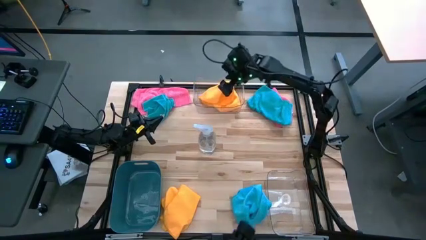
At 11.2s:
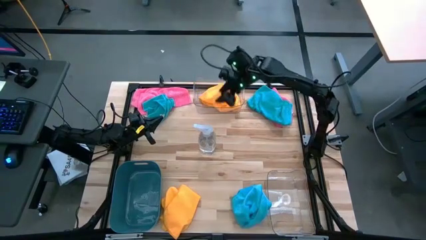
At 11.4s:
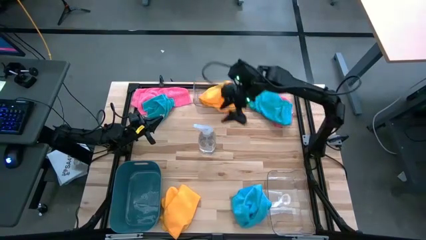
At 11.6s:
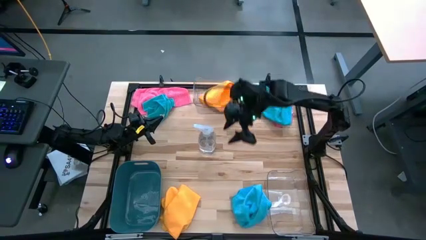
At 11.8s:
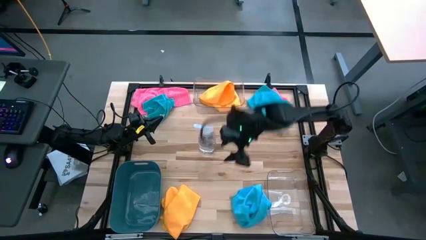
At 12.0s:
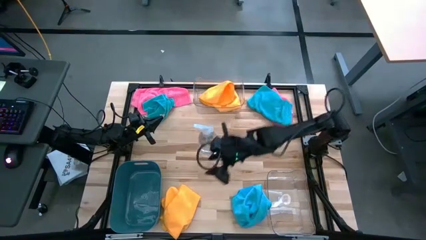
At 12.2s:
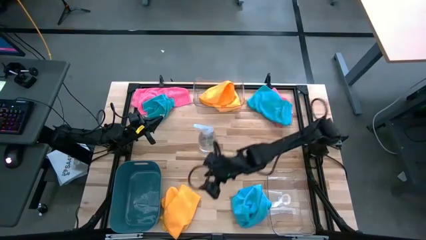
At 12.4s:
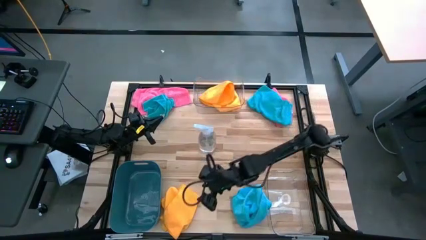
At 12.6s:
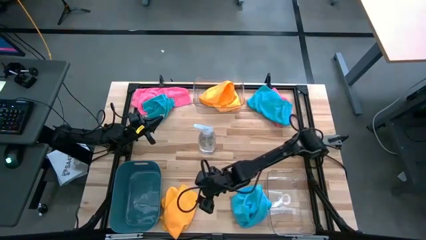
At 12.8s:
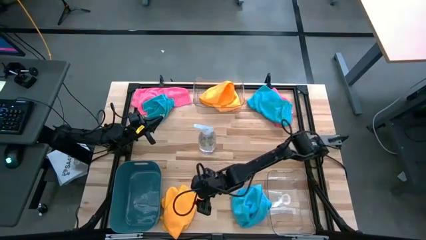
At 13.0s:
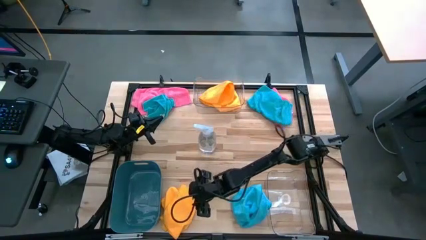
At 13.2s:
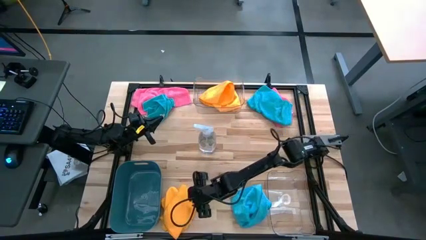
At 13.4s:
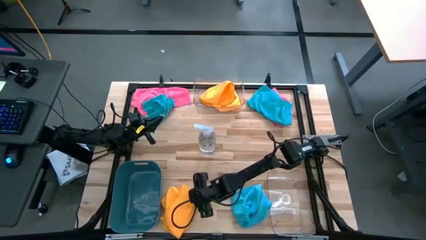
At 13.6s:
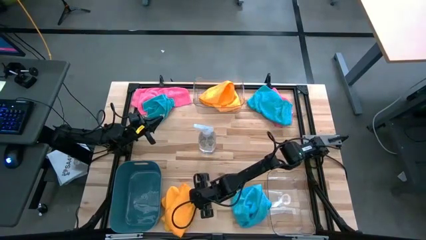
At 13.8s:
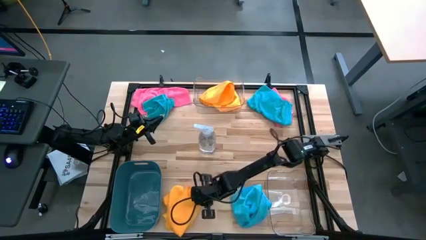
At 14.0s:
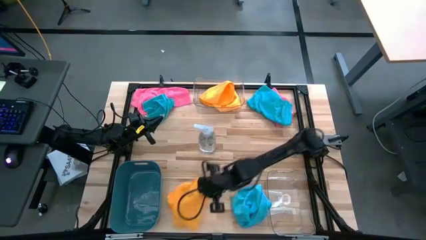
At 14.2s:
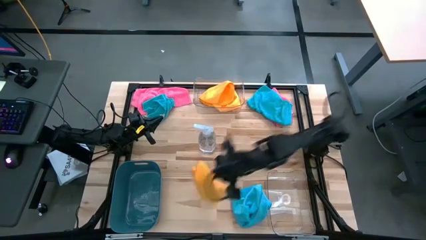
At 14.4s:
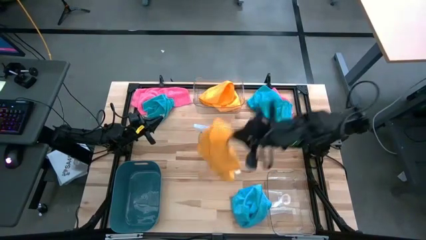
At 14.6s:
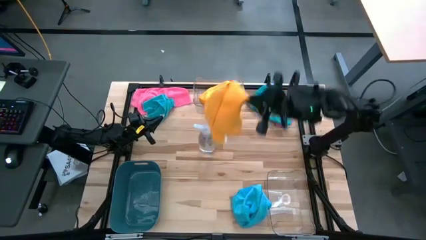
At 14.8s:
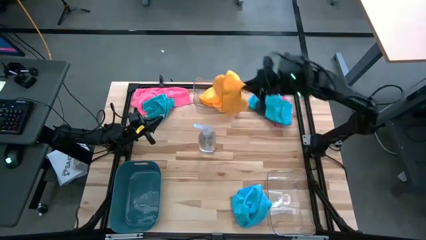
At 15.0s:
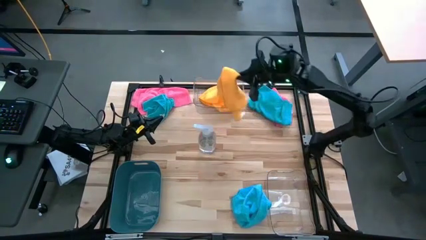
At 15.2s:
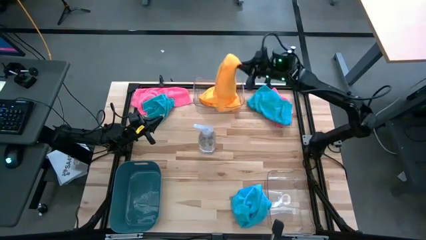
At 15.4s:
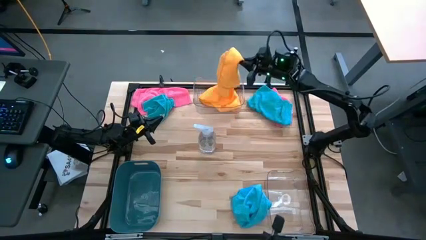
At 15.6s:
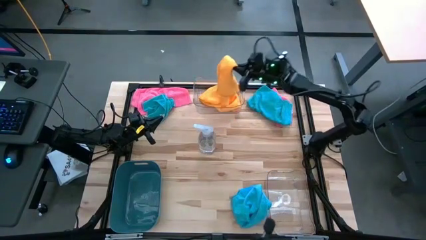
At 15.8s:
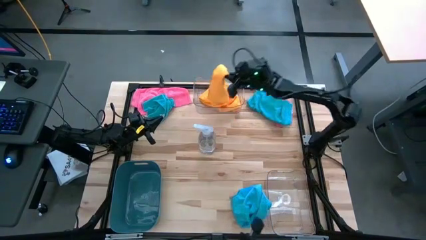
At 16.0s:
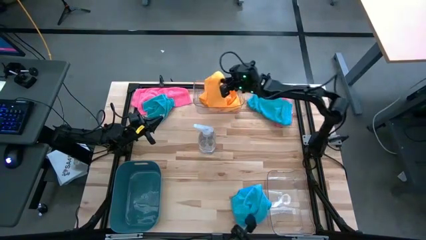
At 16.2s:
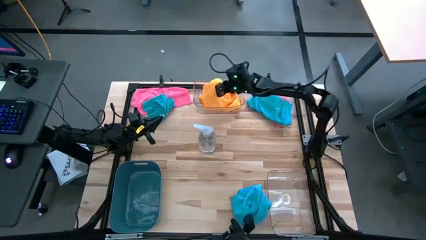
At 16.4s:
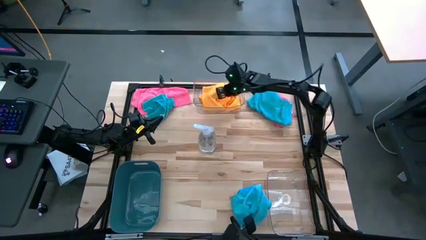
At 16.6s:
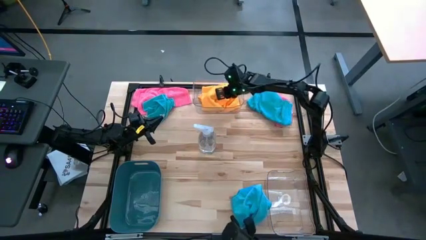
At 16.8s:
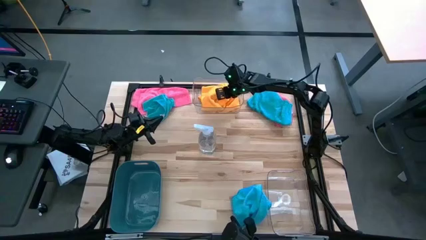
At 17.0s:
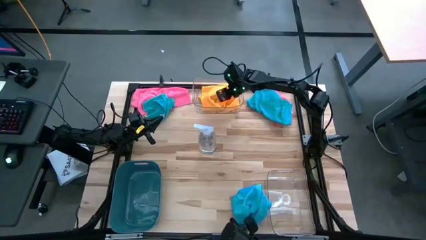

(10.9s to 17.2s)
Task: Sort microfiber towel by color & place in baskets
Put the yellow microfiber cloth into the top transparent bin

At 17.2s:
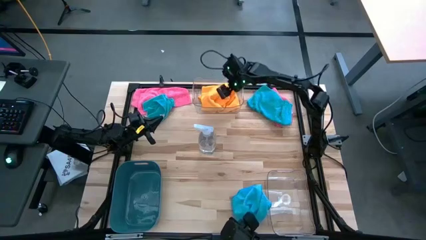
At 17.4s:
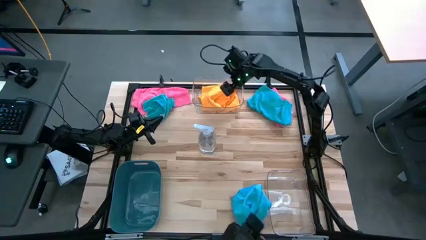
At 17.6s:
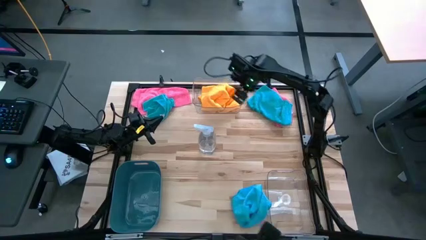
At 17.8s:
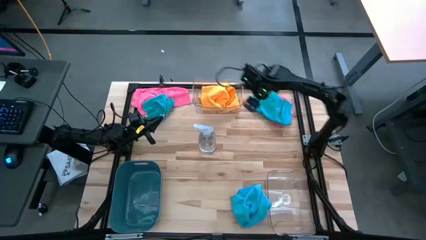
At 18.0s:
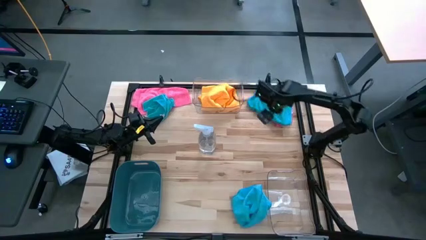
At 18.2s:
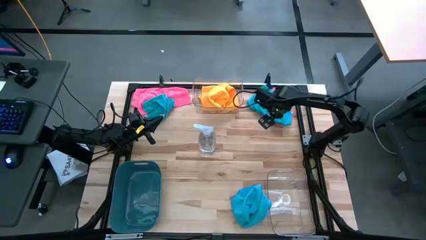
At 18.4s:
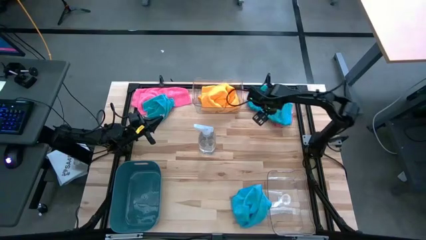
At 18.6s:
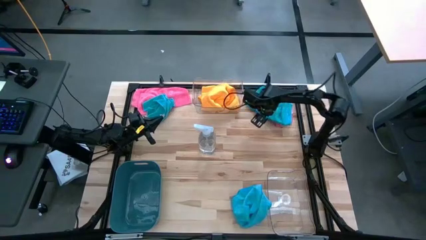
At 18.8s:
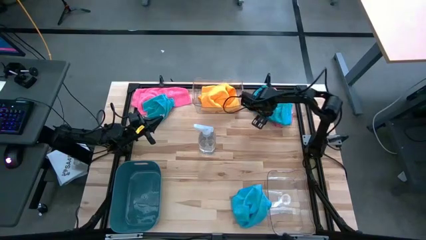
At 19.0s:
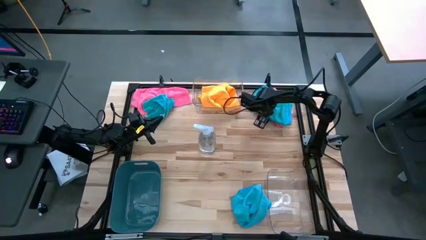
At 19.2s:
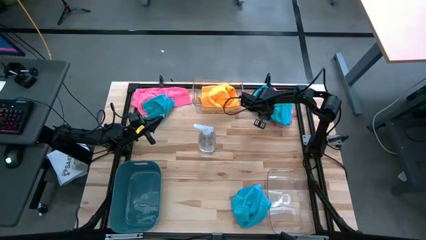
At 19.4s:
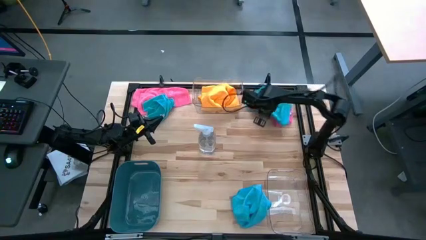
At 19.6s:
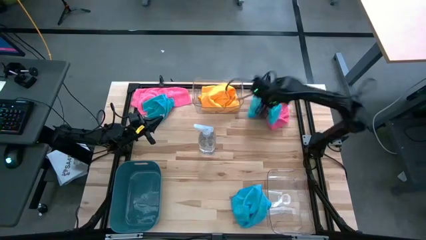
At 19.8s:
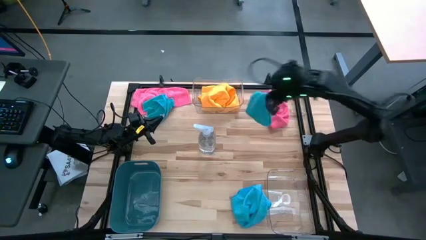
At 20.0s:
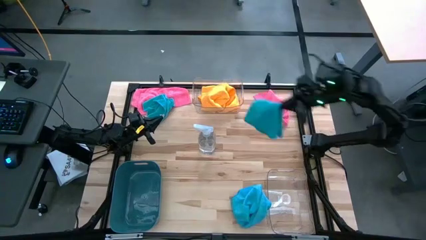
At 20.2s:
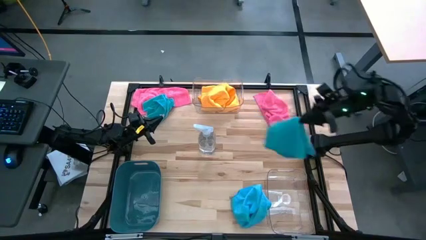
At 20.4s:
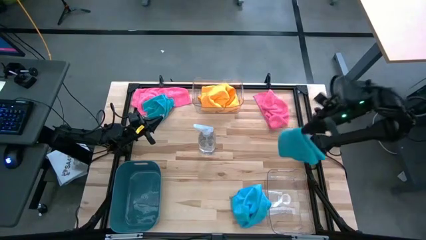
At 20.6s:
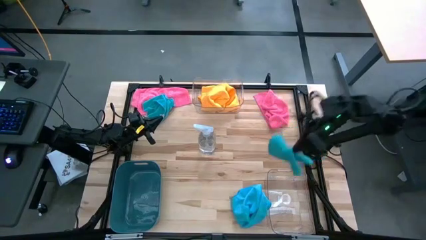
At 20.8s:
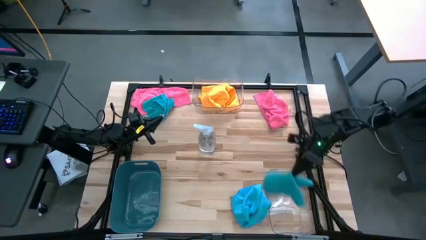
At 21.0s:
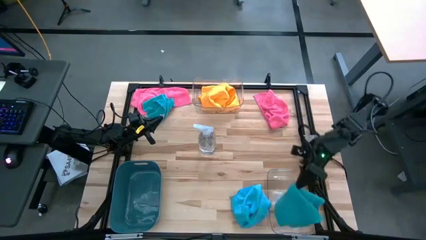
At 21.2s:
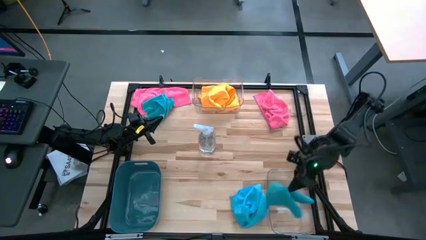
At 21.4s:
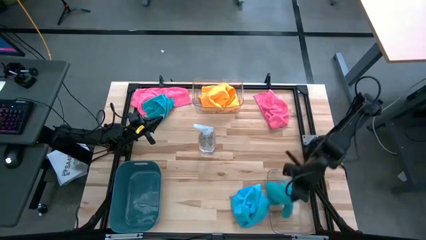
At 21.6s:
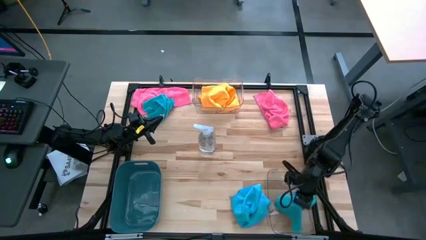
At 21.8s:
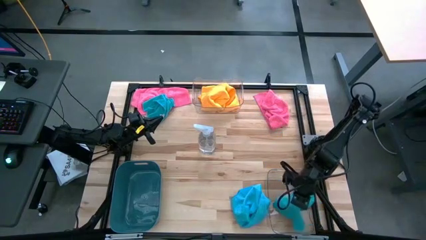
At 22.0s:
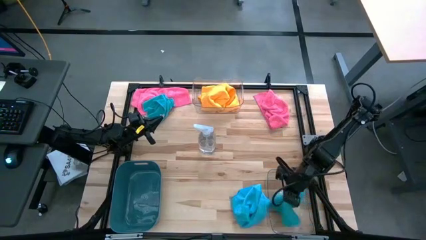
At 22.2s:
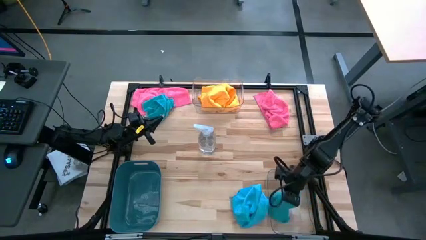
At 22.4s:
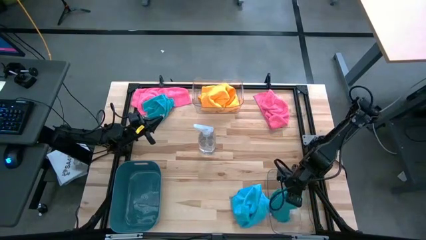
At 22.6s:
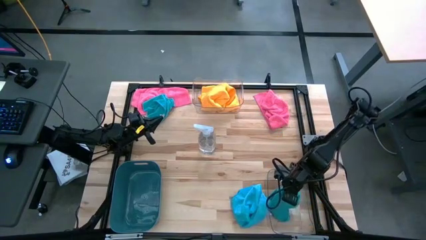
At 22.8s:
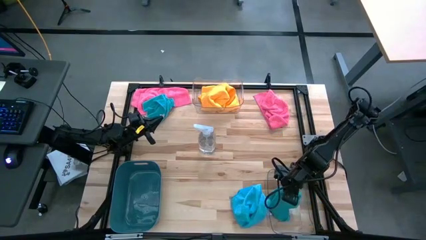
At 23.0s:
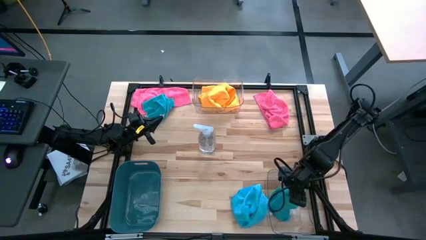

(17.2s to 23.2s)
Put the top right blue microfiber cloth into the bottom transparent bin

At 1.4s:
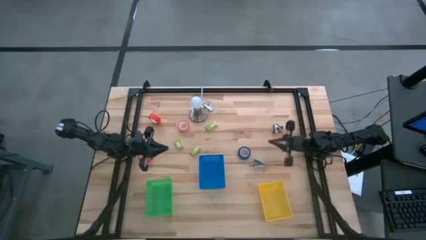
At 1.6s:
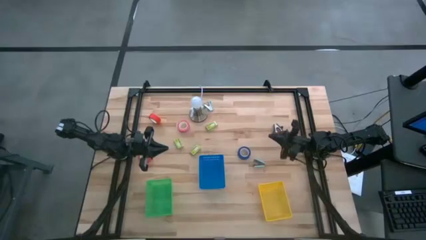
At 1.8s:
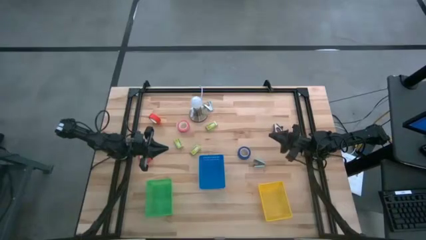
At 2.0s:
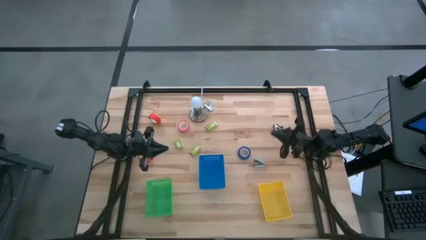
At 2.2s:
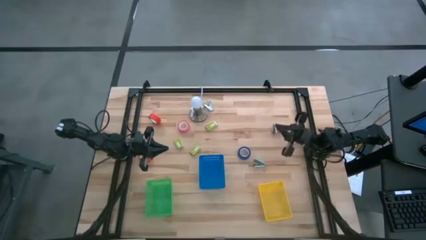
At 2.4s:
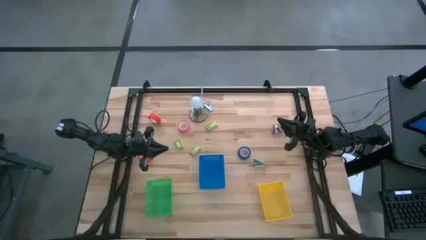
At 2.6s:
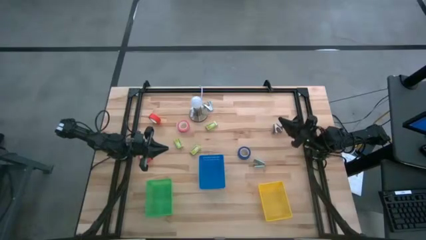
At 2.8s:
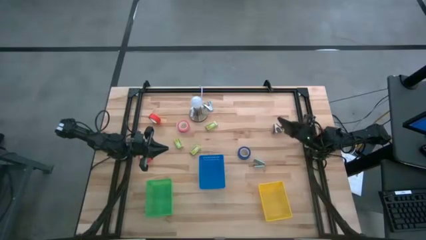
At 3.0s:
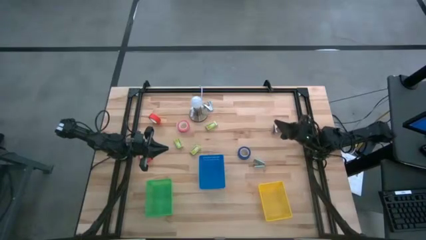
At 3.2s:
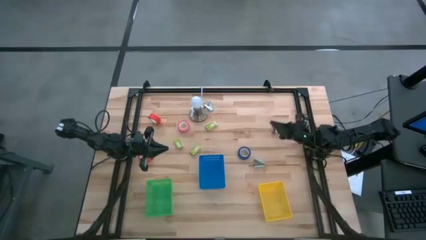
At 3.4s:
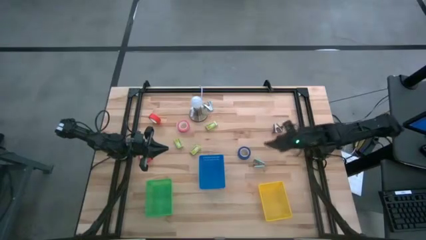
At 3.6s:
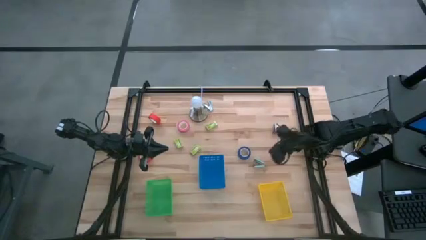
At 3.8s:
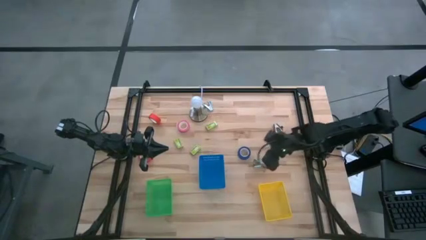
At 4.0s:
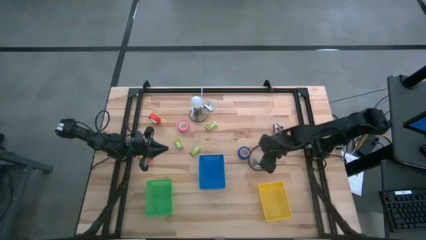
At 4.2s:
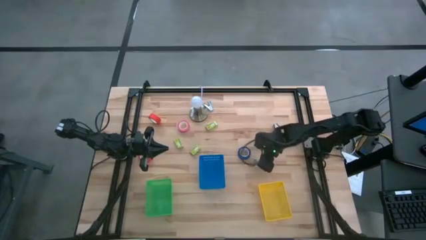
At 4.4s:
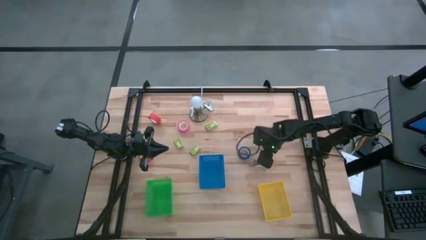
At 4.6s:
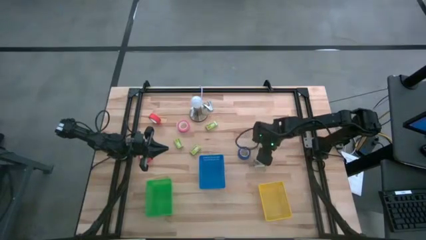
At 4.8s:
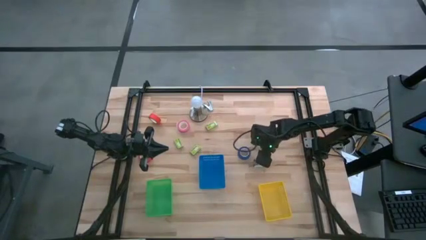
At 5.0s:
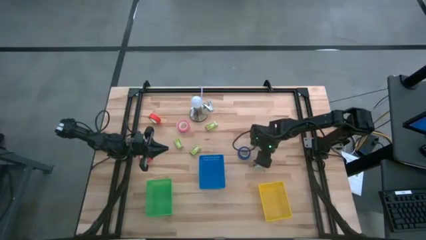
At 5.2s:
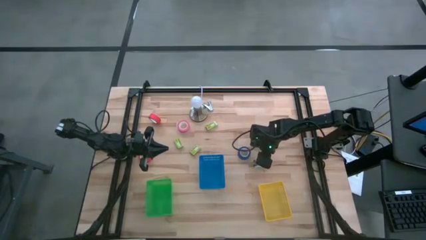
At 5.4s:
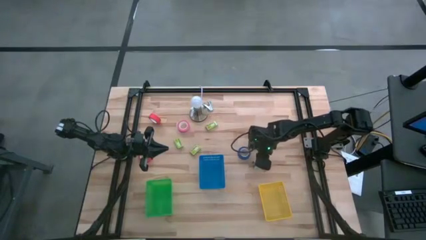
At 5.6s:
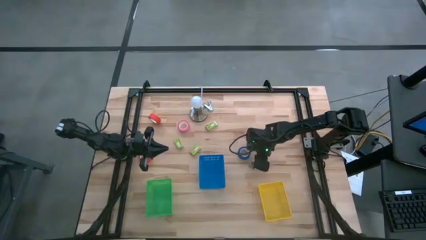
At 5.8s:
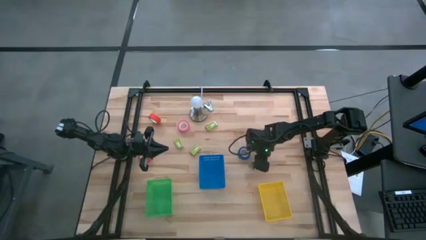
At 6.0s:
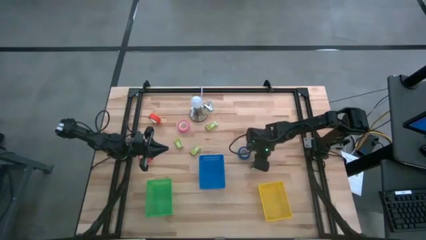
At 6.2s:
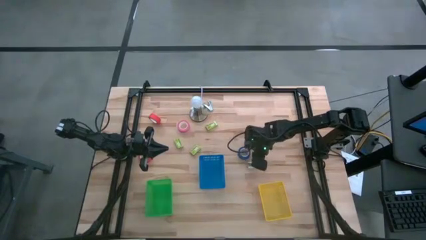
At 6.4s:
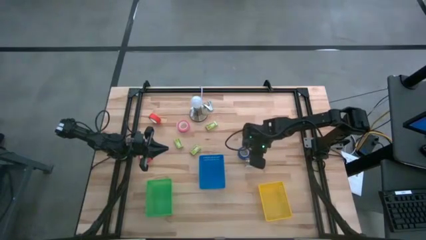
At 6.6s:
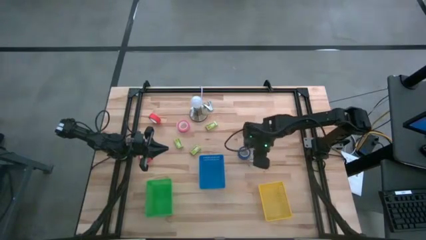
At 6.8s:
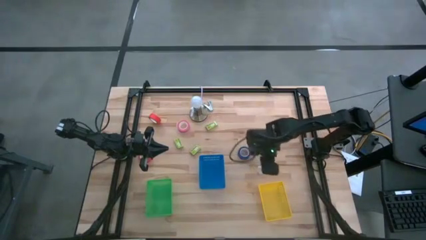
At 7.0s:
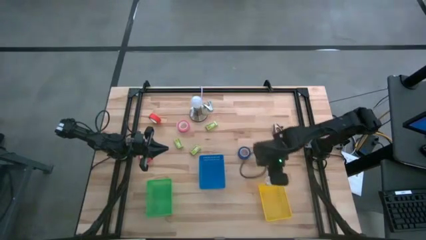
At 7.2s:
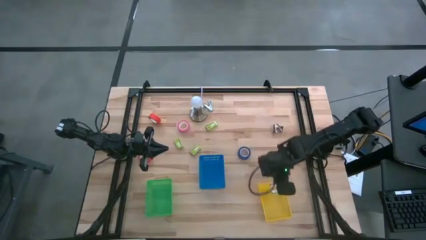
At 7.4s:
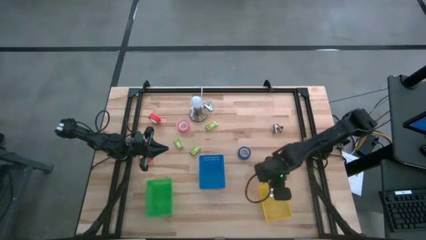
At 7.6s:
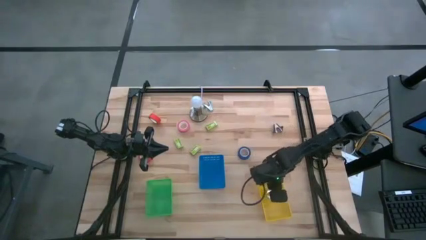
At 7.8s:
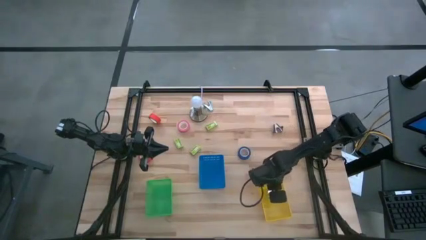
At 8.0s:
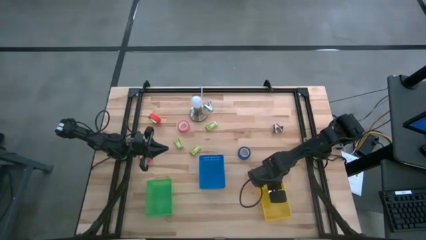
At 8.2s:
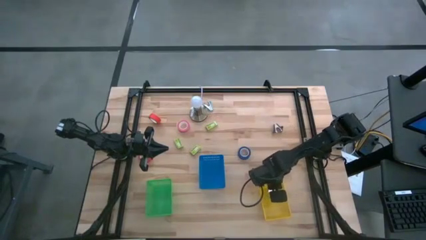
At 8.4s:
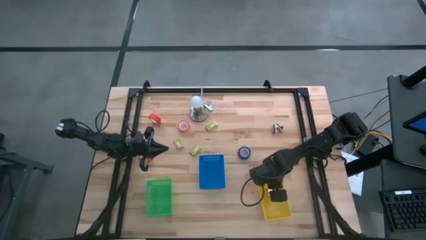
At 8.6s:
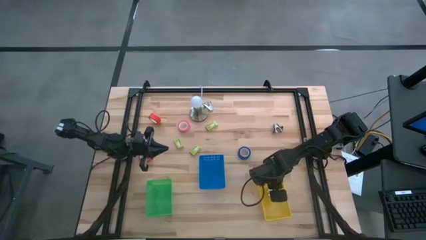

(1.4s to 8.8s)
Task: Pick and place Stapler, Stapler remover, tape
Put the bottom blue staple remover into the yellow bin
